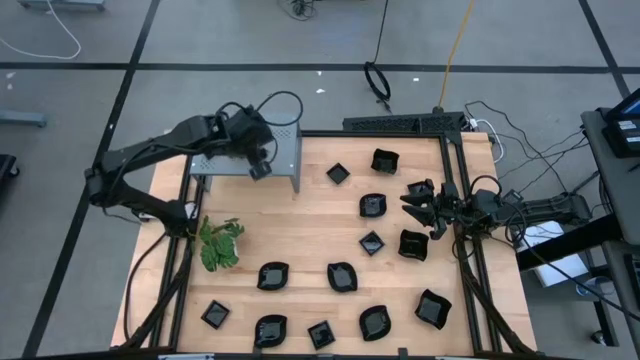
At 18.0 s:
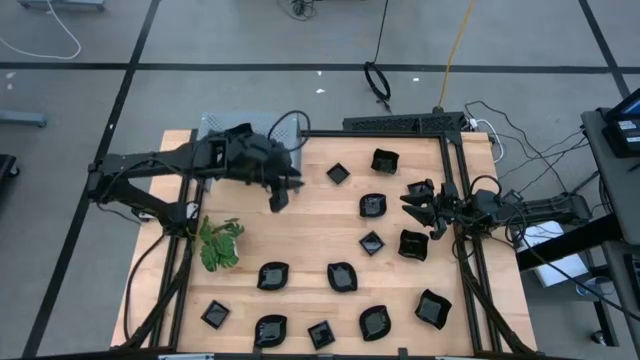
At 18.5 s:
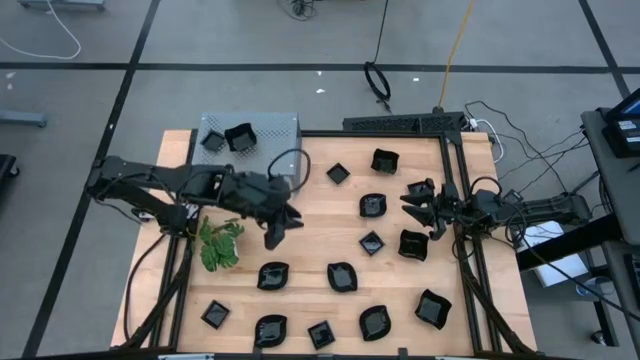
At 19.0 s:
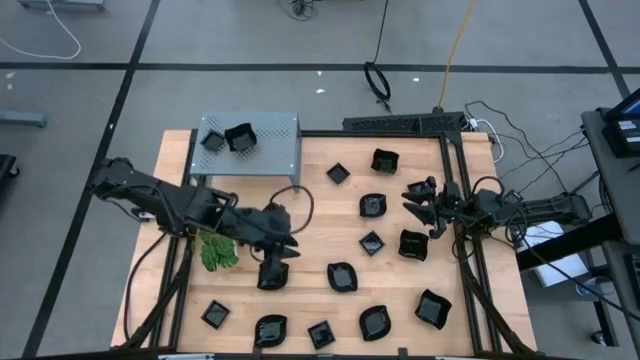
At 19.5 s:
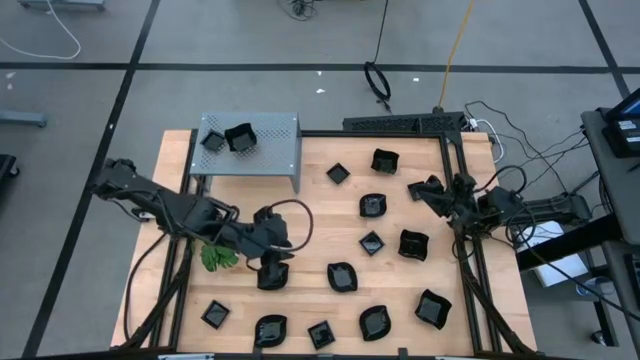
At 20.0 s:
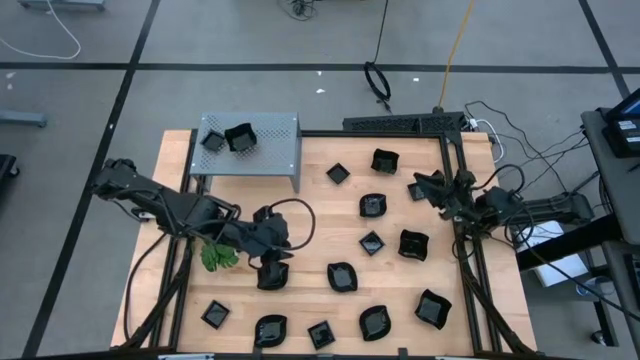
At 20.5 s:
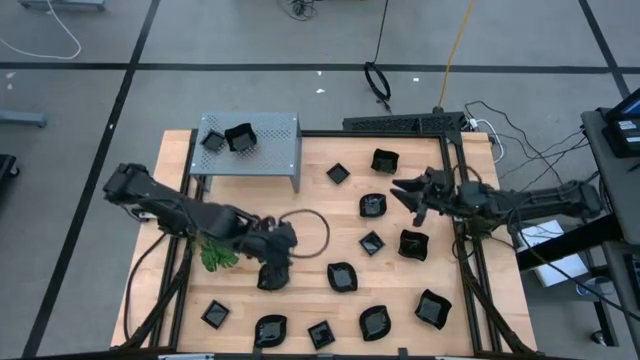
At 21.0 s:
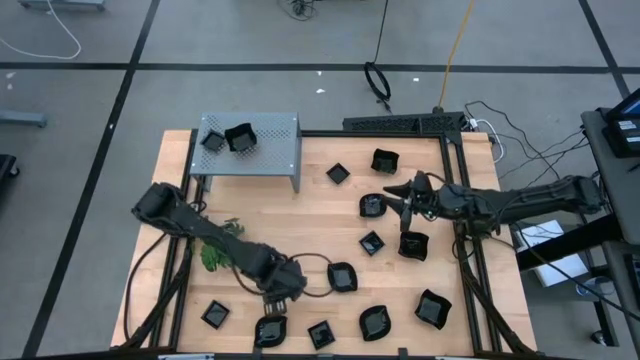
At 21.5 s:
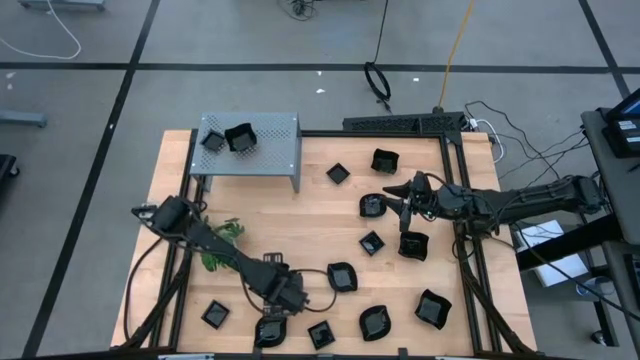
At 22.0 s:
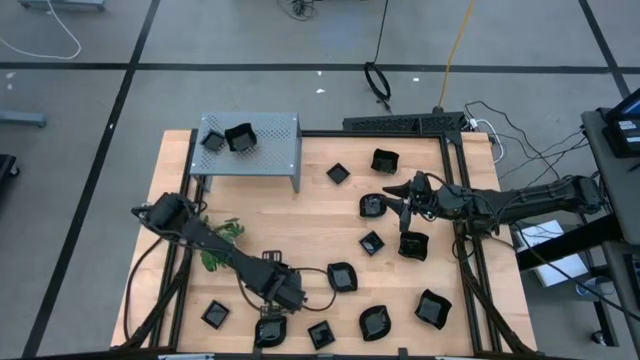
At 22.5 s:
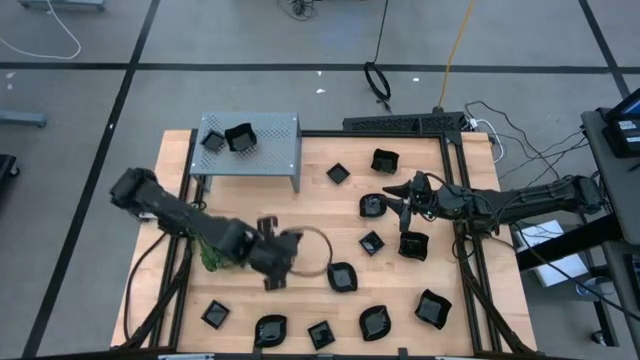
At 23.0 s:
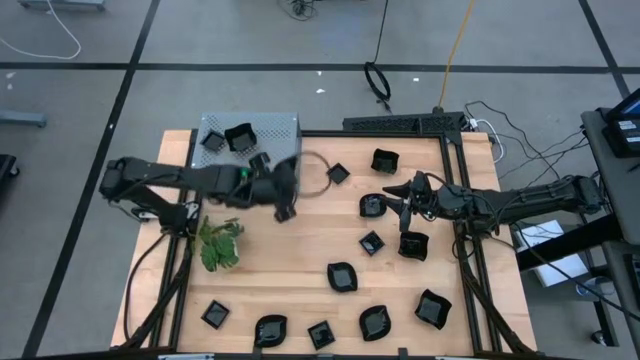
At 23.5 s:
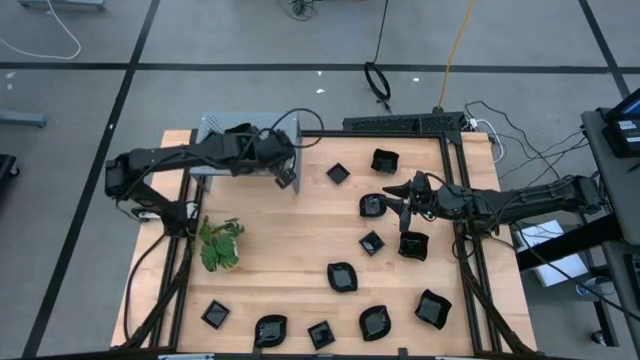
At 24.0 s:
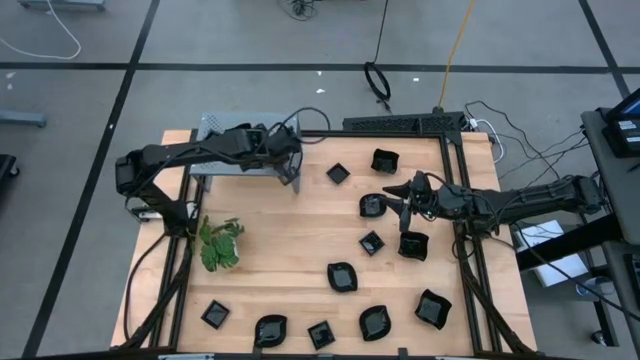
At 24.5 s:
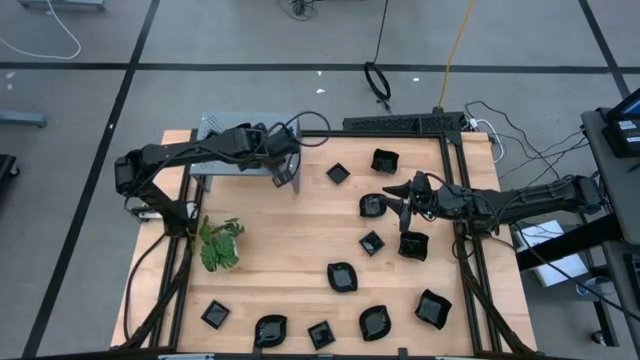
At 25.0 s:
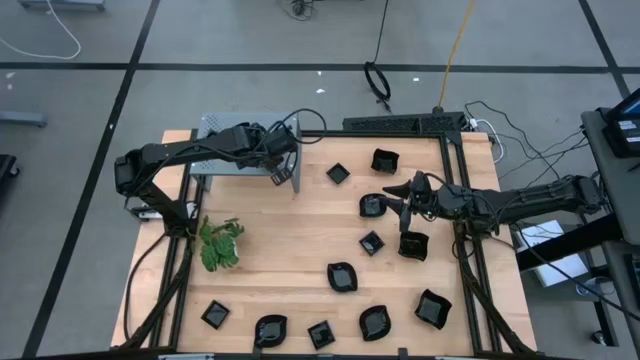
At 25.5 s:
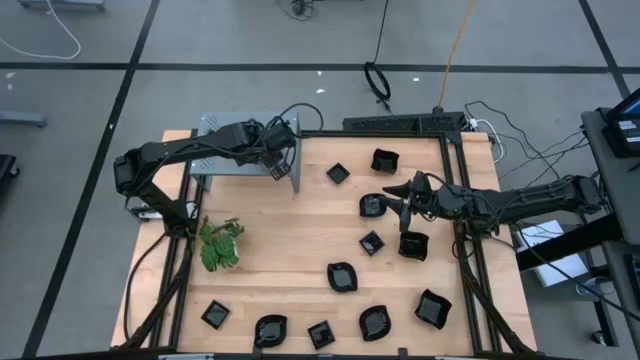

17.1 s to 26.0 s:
Task: Pick & Place Mini shaped plates
Put the leaf-shaped plate on the shelf

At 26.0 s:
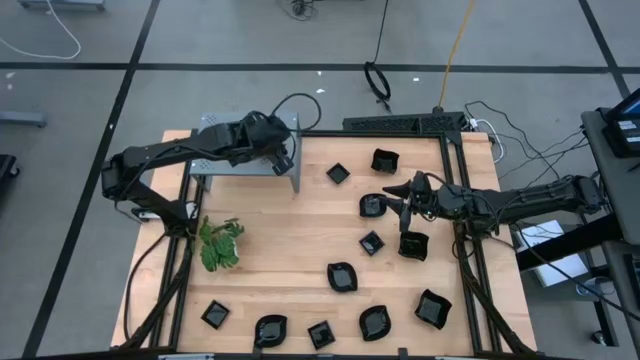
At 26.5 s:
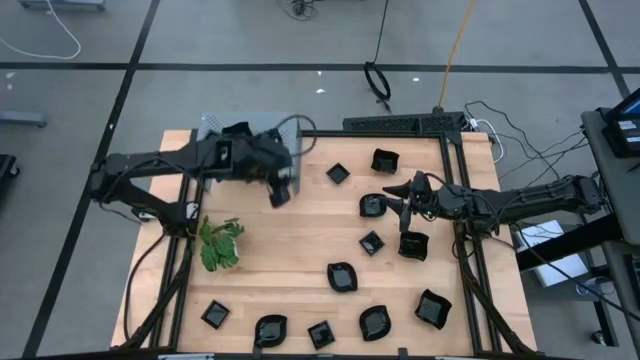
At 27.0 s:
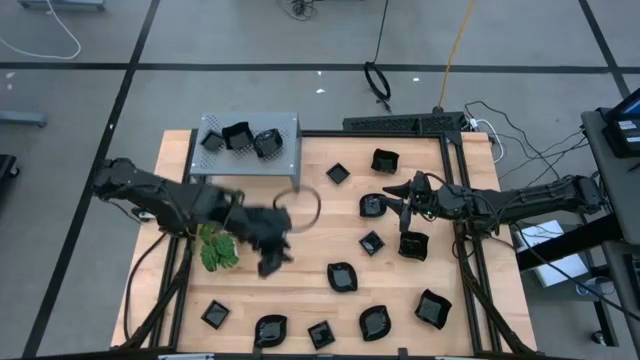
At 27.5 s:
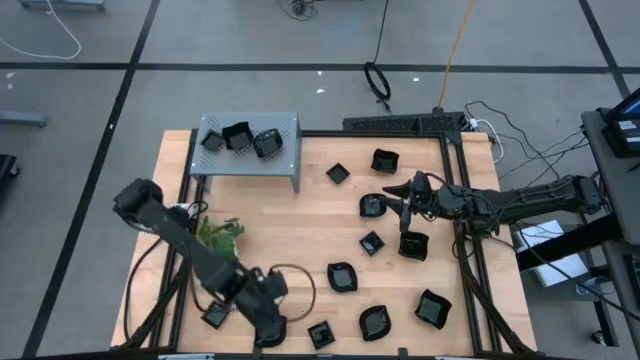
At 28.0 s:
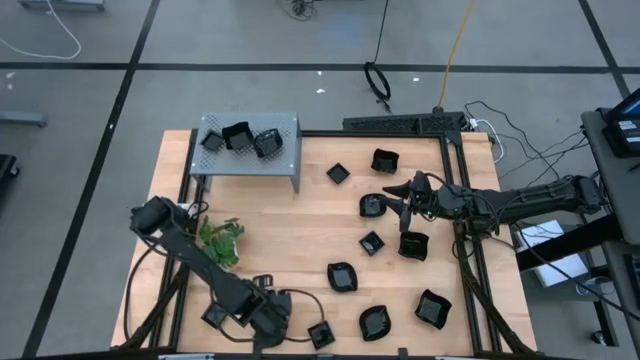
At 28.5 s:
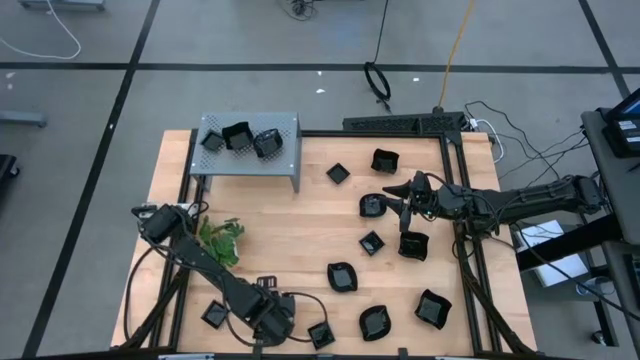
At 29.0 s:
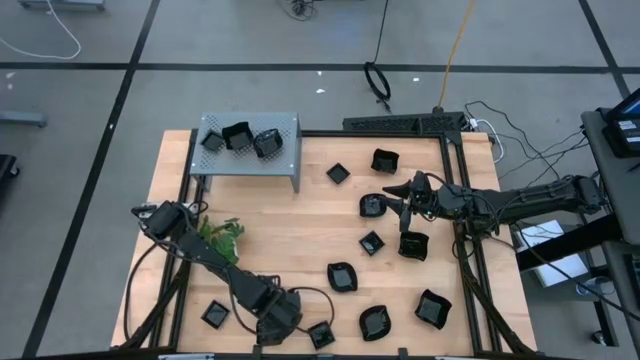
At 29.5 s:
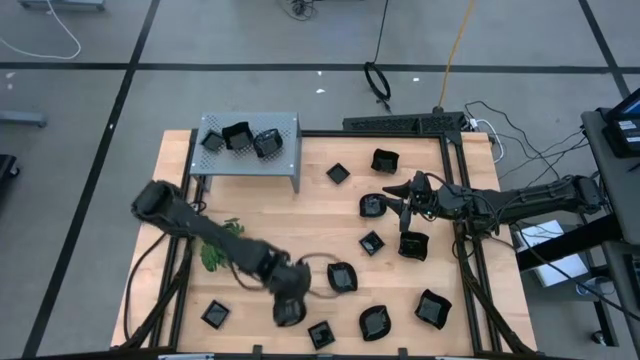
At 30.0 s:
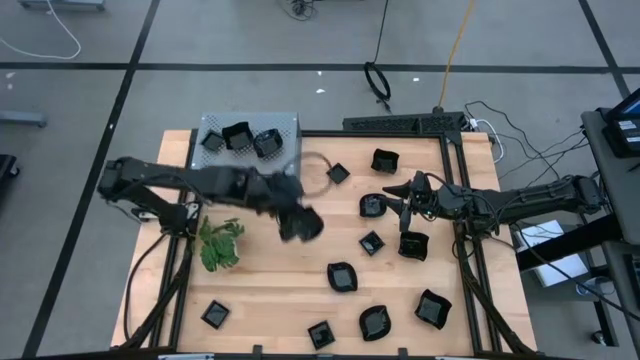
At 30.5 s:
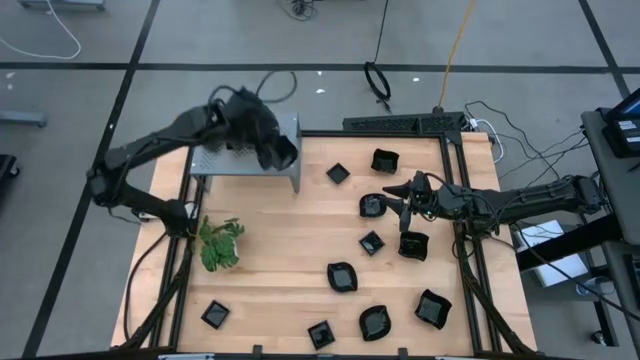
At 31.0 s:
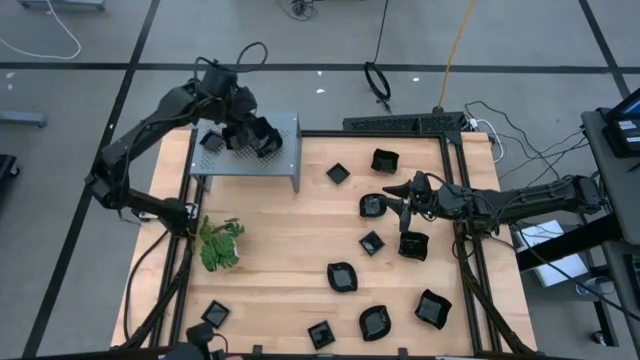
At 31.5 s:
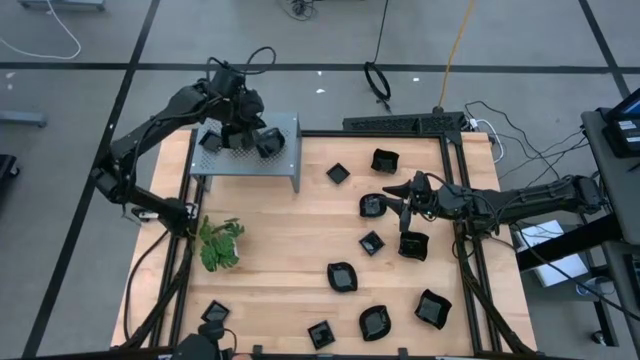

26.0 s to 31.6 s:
Stack the leaf-shaped plate on top of the leaf-shaped plate on the shelf

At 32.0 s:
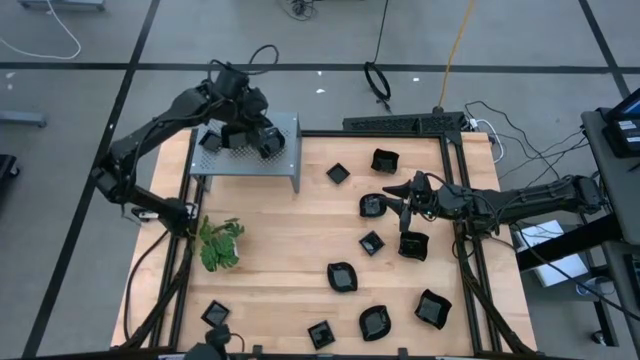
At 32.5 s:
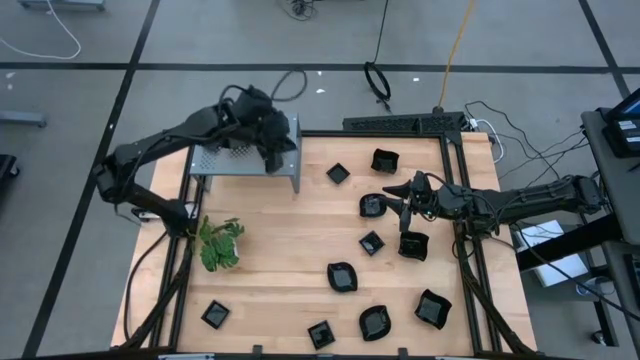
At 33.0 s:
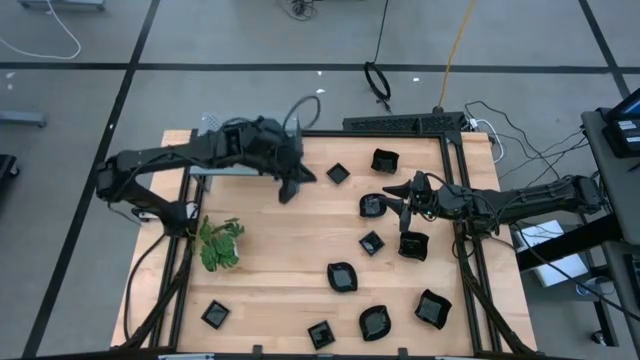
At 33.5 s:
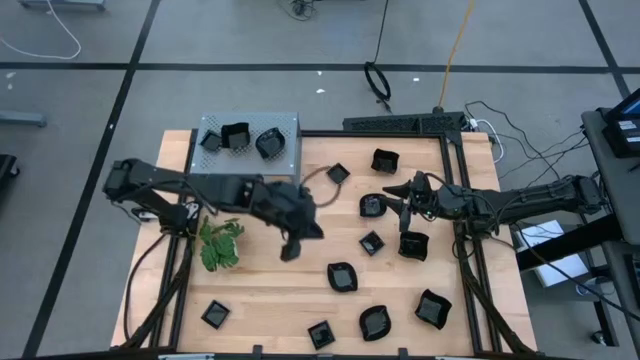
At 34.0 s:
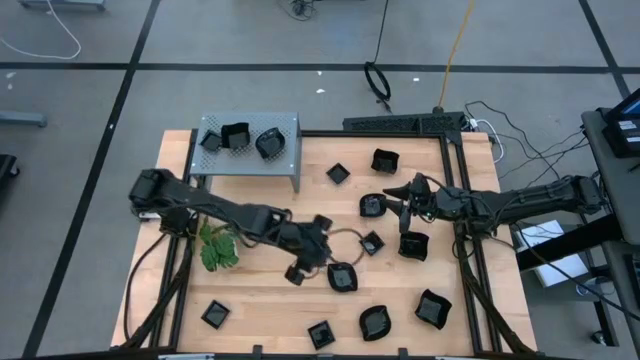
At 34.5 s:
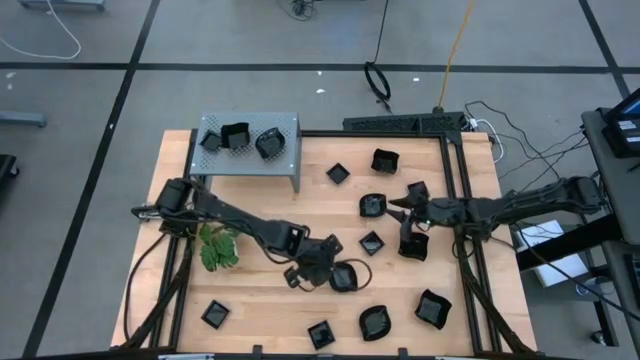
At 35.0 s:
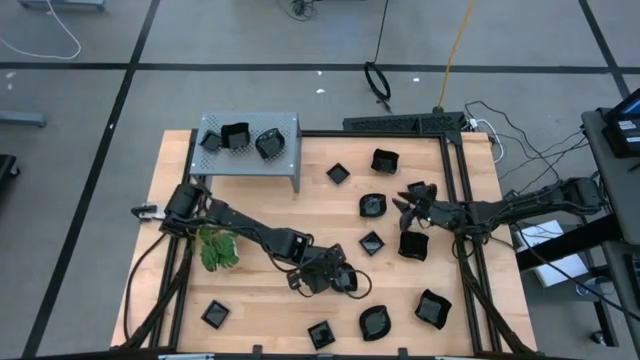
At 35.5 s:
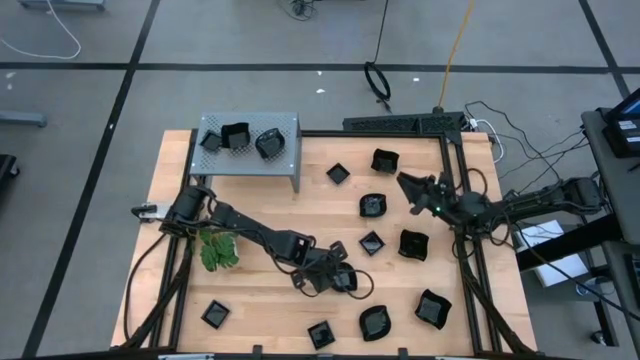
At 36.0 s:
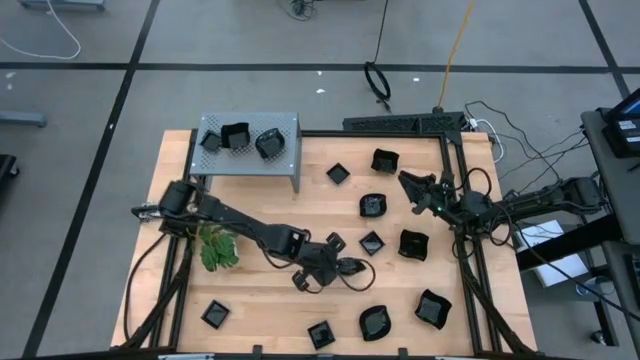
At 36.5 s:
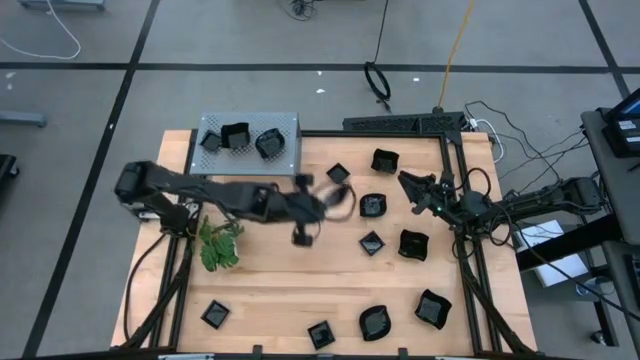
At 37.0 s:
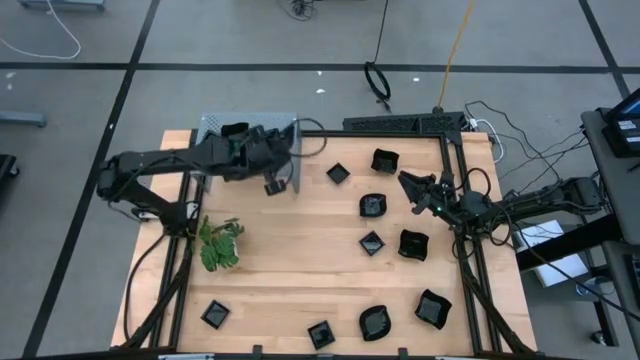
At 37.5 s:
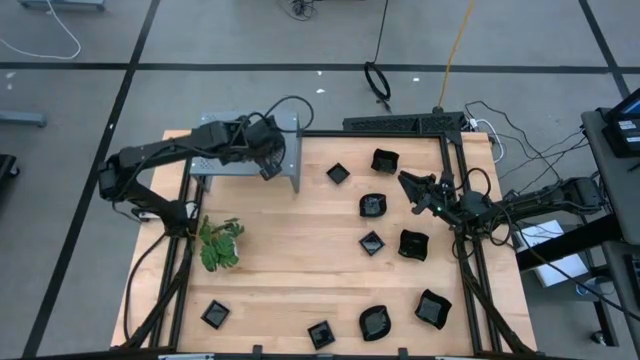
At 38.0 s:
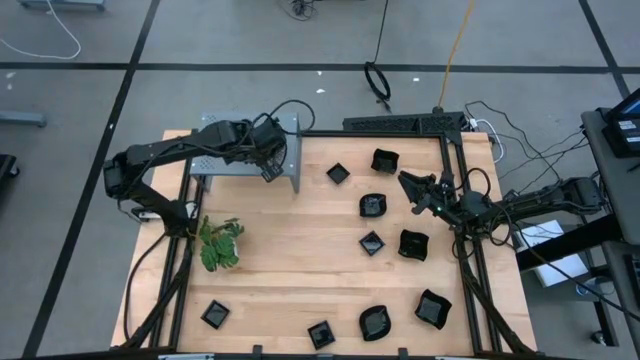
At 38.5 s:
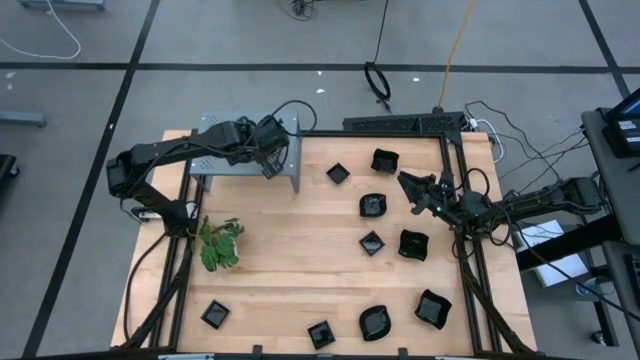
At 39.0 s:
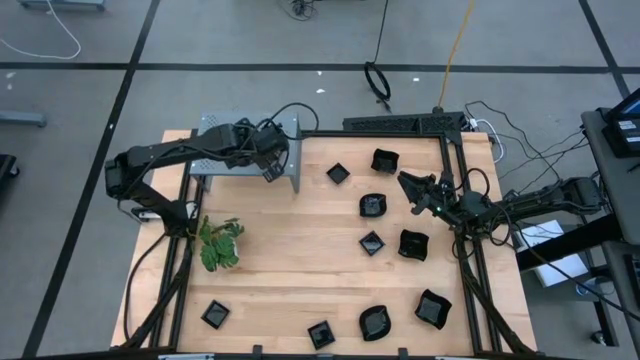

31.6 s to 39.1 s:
Stack the leaf-shaped plate on top of the leaf-shaped plate on the shelf
